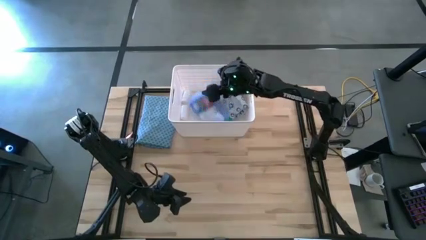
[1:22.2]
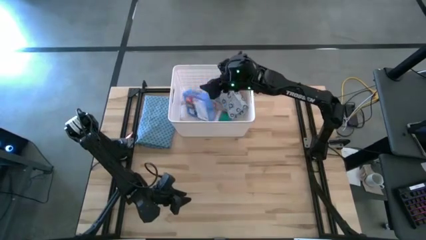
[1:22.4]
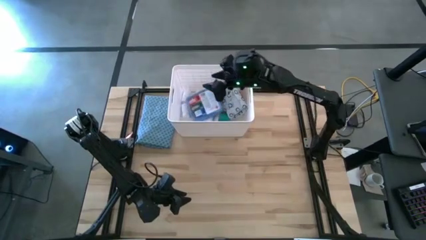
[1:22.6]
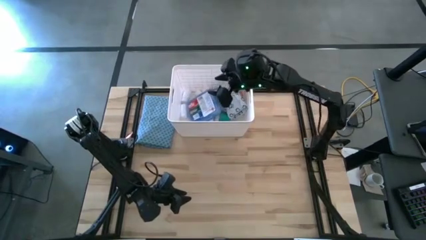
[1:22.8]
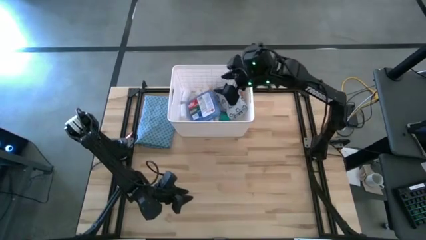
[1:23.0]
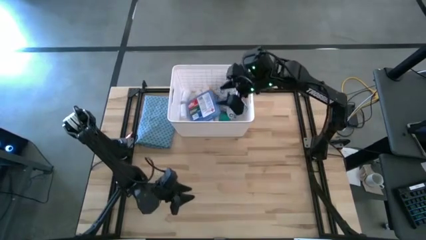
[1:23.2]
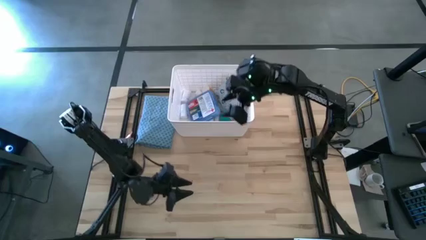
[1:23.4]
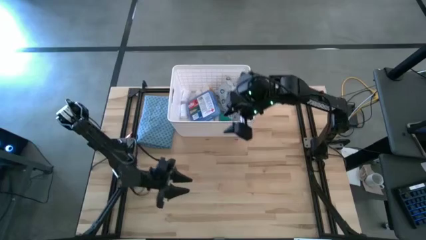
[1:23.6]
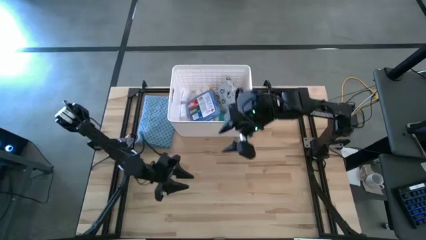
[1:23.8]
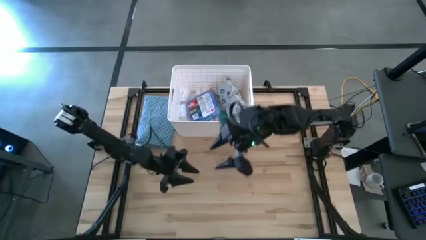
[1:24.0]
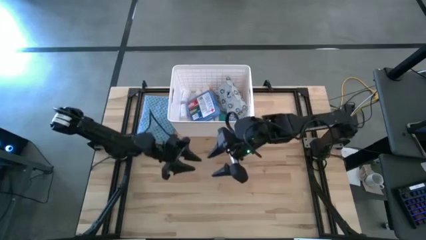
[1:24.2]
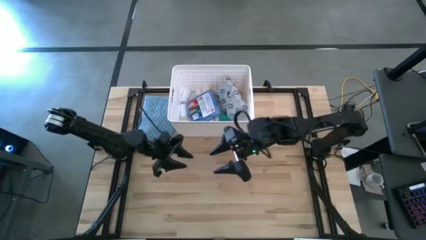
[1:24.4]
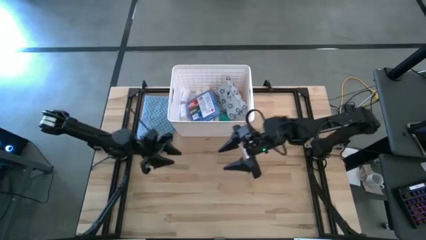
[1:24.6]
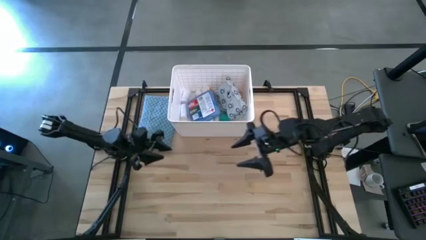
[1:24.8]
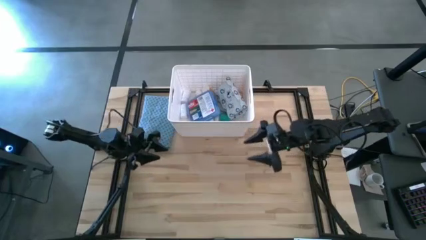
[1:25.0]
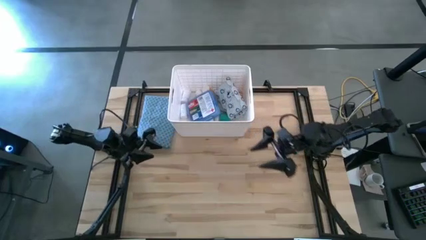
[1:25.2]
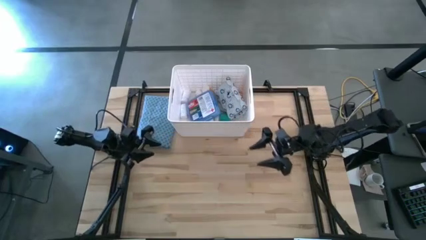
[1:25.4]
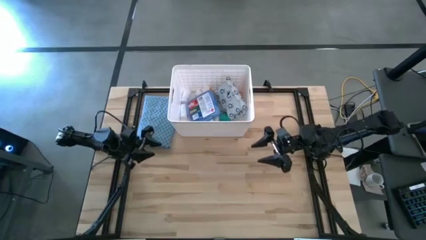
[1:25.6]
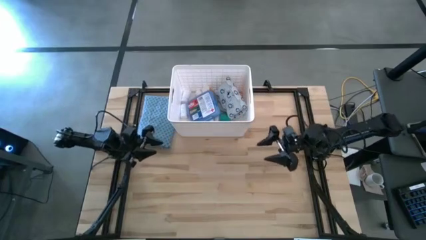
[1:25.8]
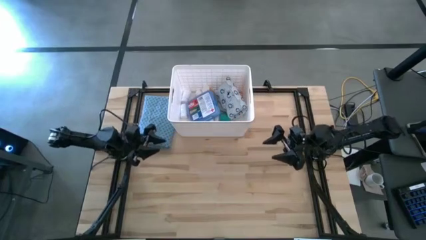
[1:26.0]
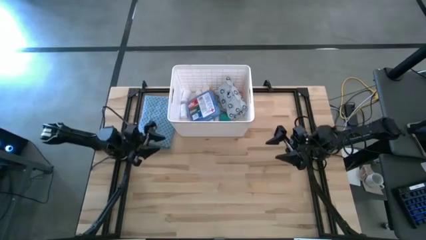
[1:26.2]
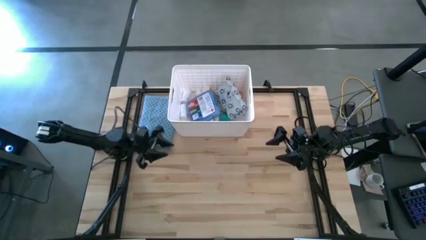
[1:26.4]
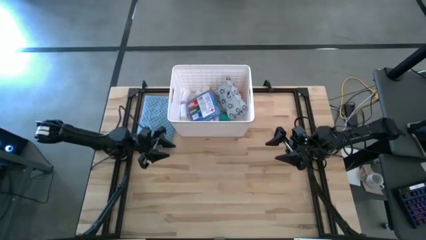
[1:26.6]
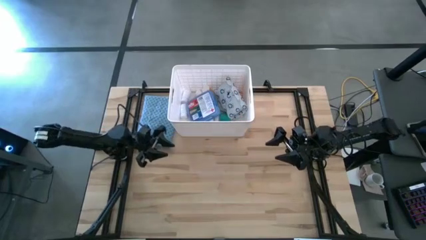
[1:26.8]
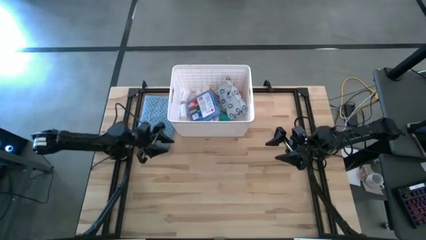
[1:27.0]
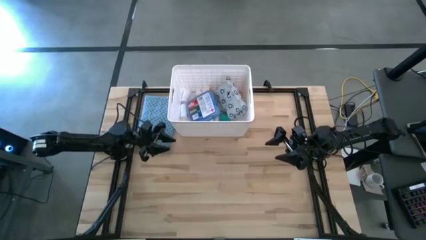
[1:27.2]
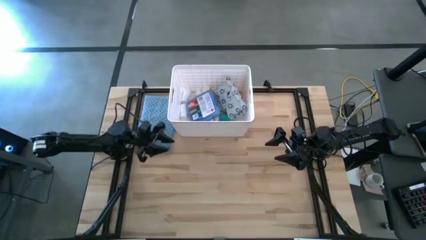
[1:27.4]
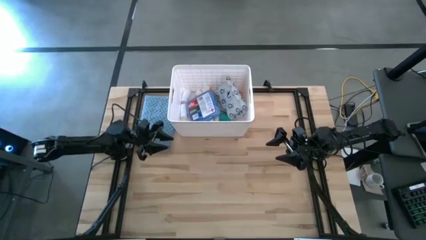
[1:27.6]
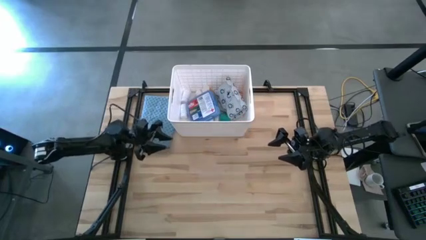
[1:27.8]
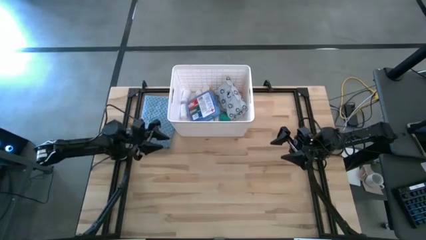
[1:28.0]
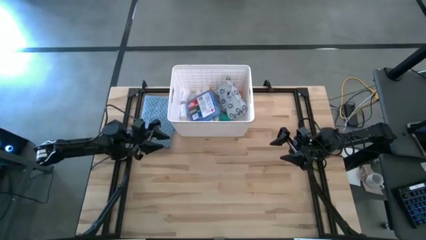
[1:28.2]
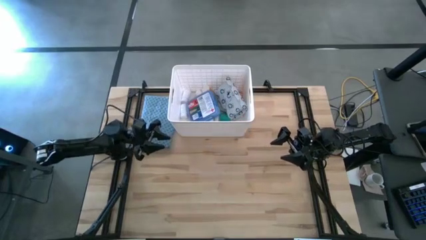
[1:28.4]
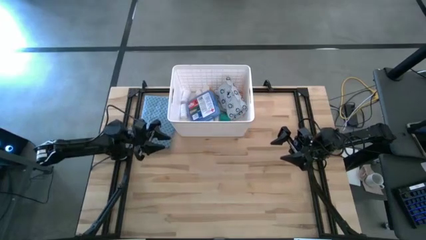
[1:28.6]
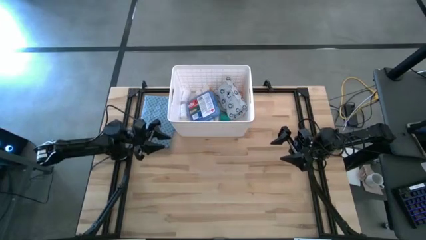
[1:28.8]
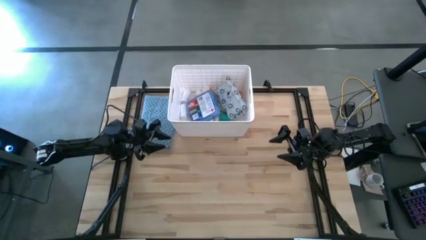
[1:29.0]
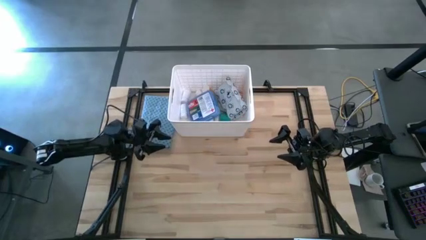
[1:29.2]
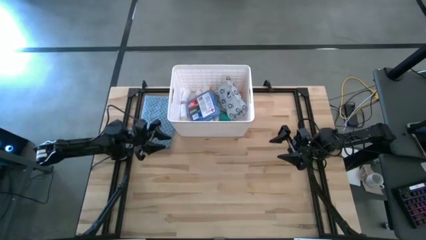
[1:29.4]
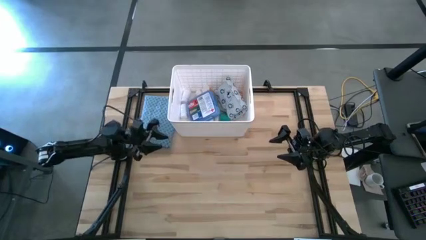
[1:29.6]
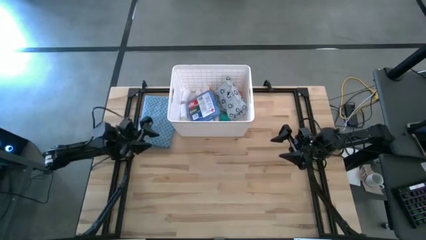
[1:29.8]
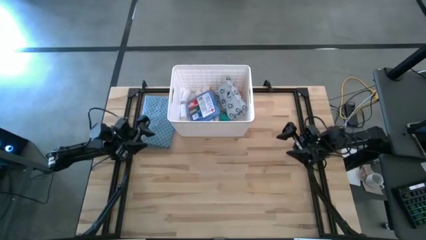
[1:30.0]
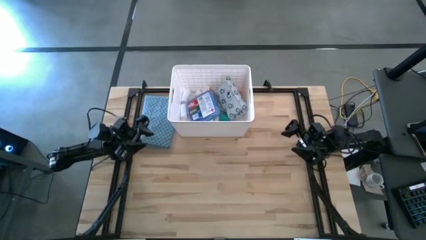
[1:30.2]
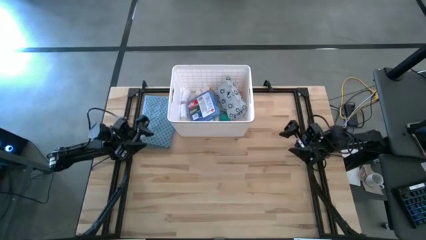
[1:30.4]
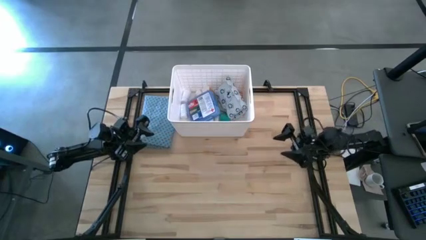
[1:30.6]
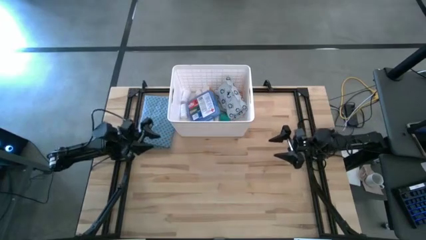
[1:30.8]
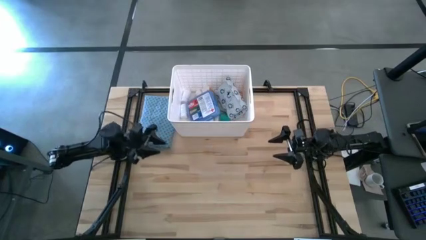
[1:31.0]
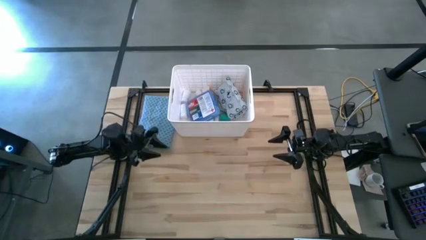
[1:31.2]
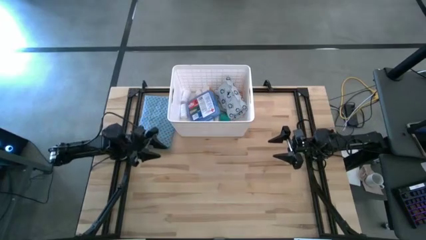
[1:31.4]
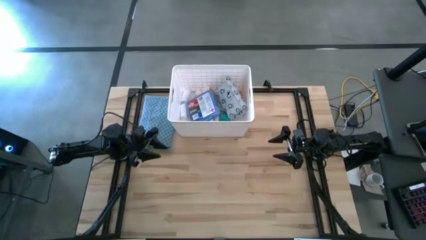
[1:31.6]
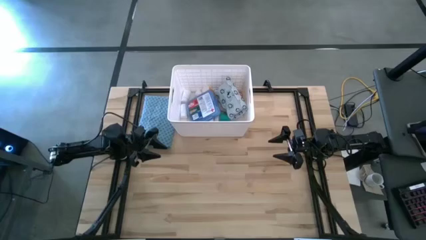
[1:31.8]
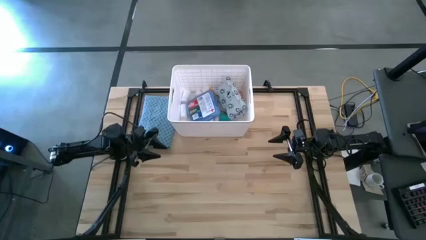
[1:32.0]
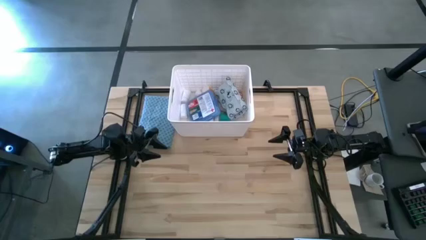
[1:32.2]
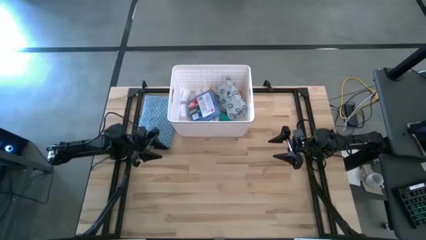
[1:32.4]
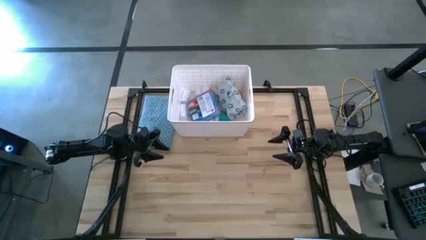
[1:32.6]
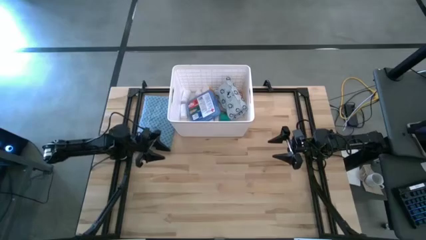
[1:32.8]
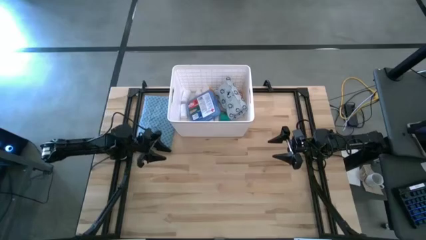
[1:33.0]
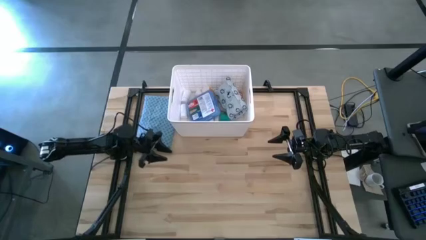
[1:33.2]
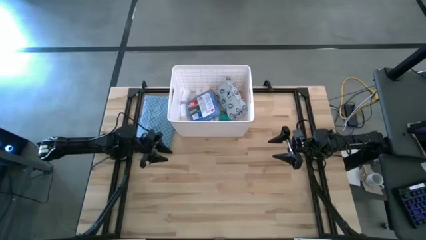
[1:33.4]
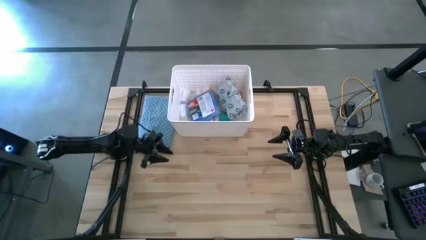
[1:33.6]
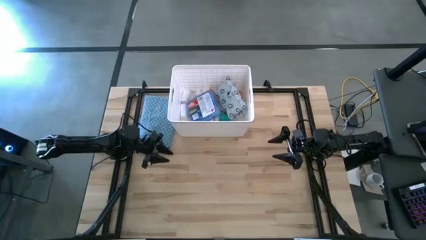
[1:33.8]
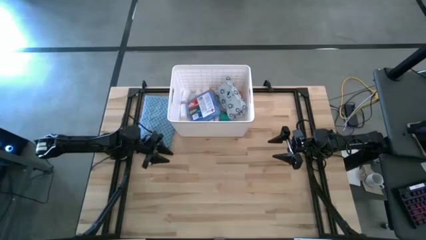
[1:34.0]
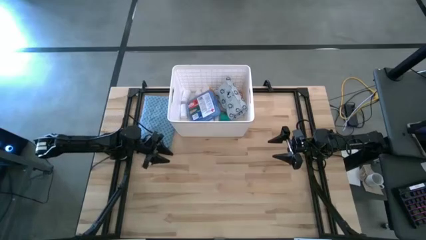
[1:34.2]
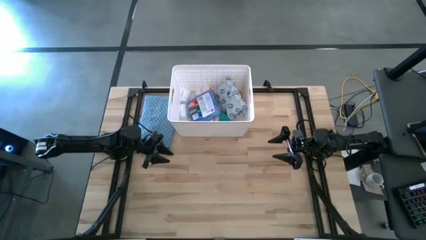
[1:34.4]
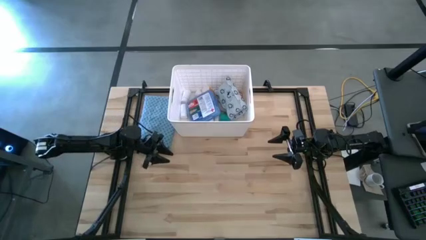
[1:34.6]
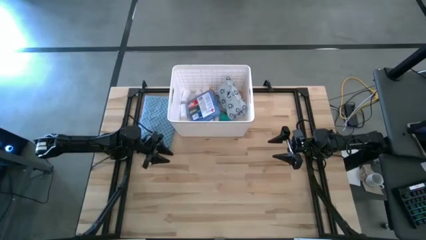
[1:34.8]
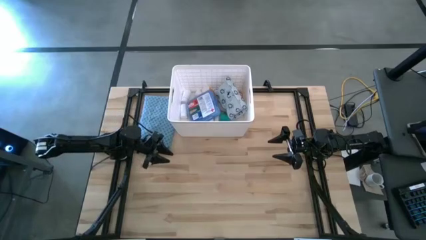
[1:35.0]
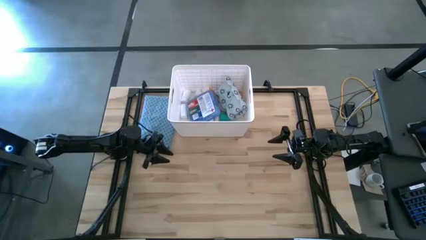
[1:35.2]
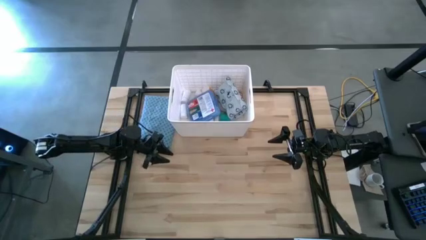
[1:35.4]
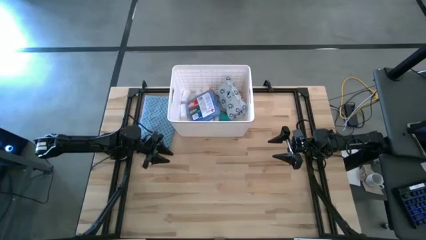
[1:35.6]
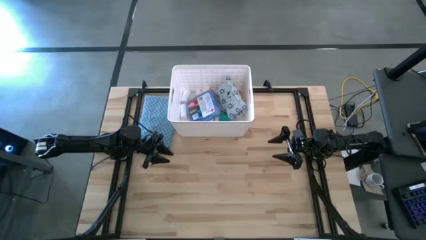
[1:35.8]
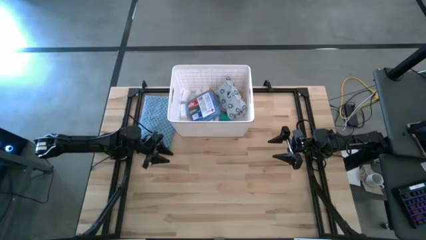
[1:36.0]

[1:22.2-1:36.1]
Task: Pick & place medical supplies in basket/bin
Return to Home Position

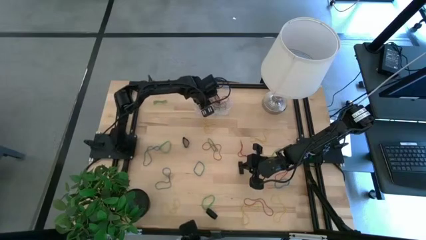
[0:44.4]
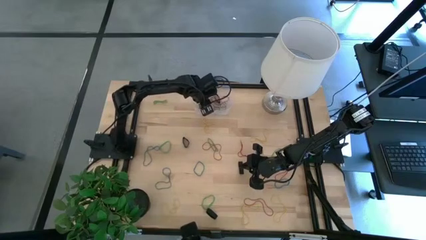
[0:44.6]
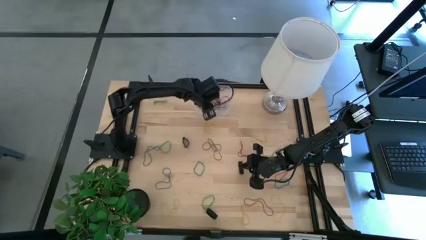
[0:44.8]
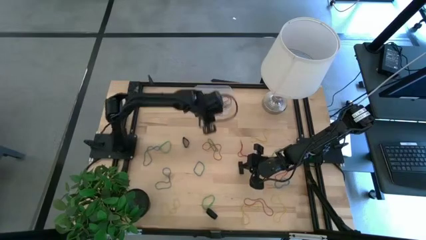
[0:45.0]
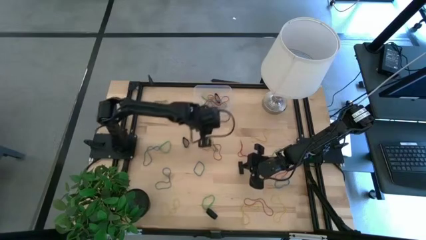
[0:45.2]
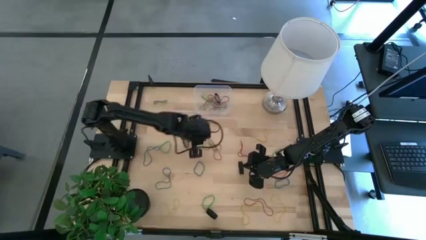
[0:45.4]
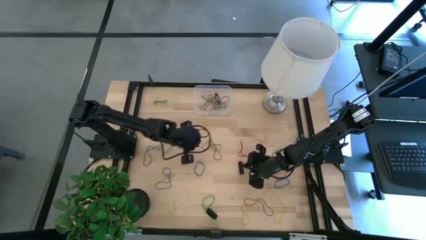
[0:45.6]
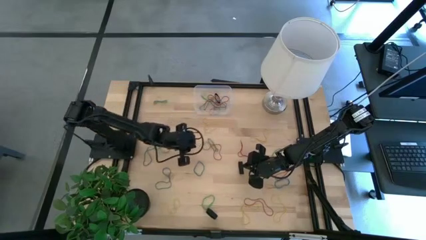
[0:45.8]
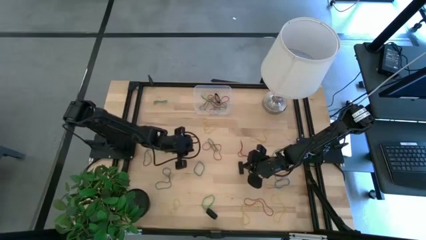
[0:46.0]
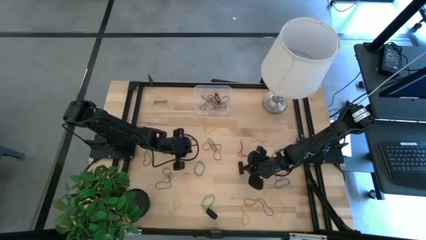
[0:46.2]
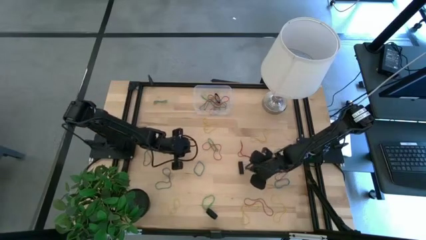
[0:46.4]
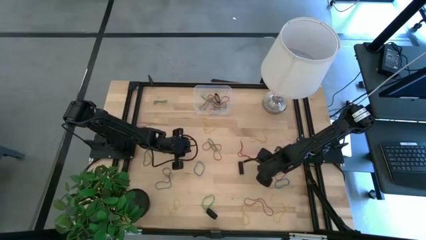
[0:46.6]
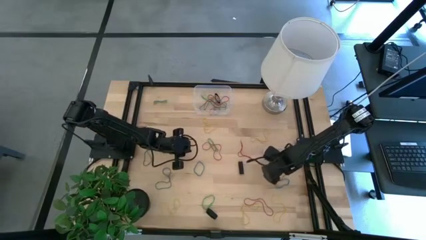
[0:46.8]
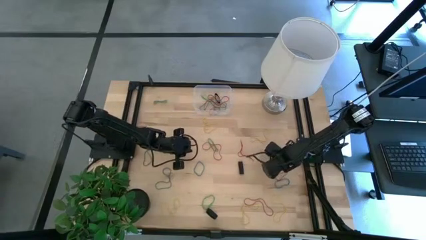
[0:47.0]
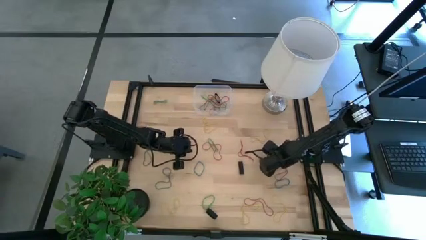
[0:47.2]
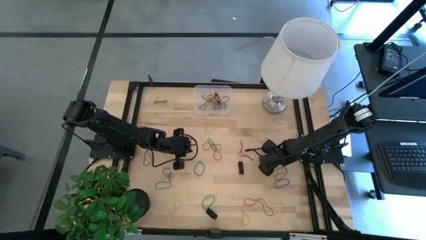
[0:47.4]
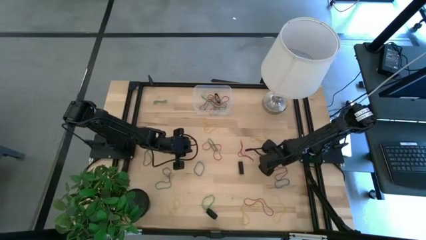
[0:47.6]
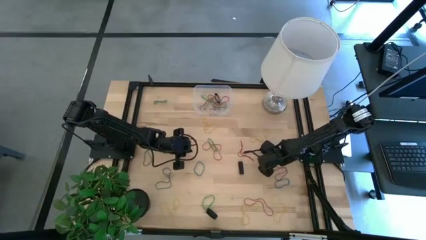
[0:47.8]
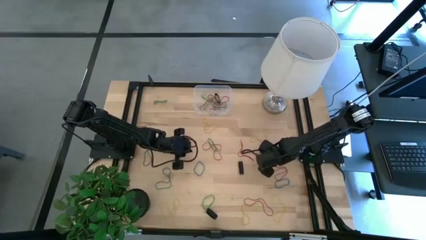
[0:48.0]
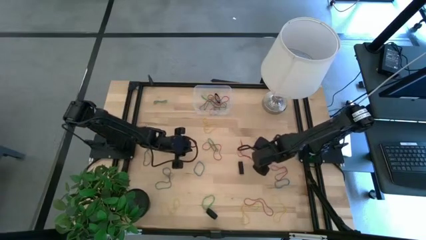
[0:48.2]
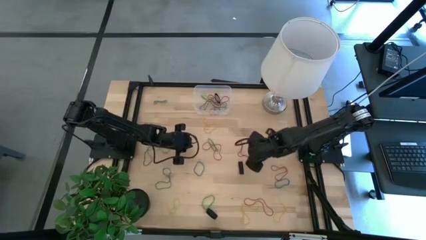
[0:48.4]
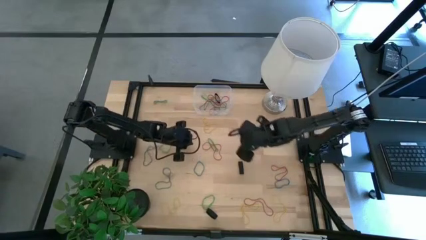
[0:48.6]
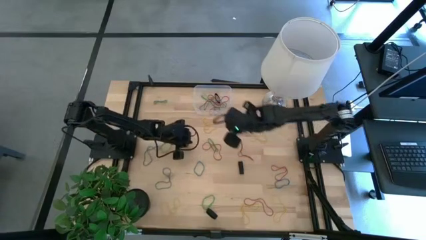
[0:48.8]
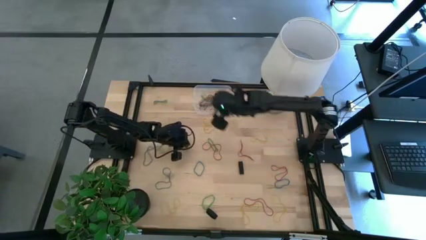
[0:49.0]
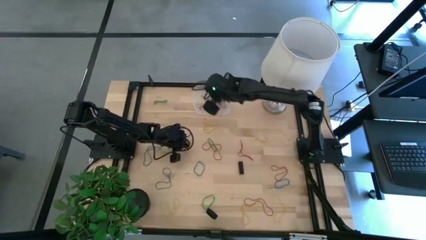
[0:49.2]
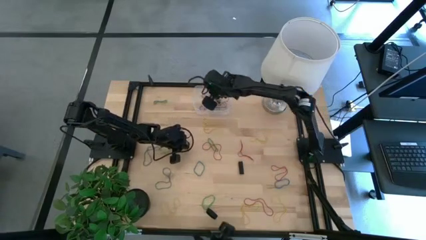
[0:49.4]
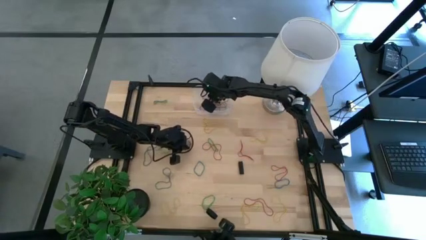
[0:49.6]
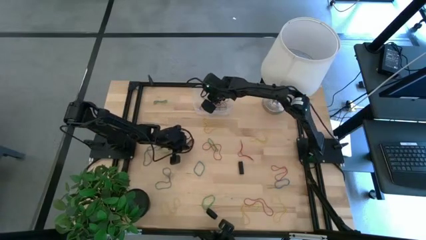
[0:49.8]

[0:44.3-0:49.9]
Task: Pick and place rubber bands into bin
Put the green rubber band into the transparent bin
